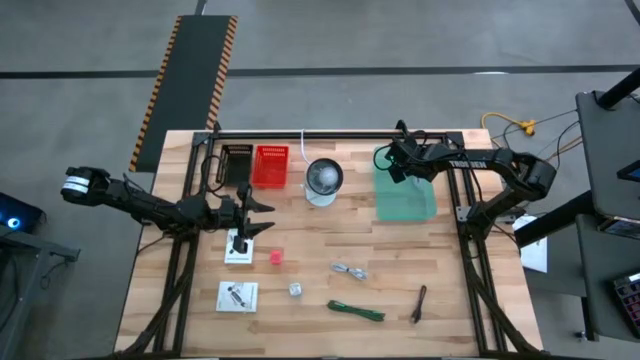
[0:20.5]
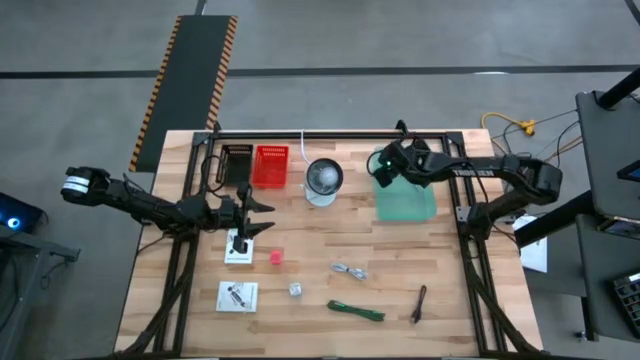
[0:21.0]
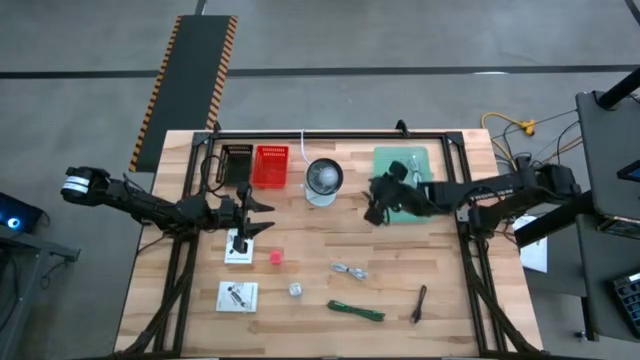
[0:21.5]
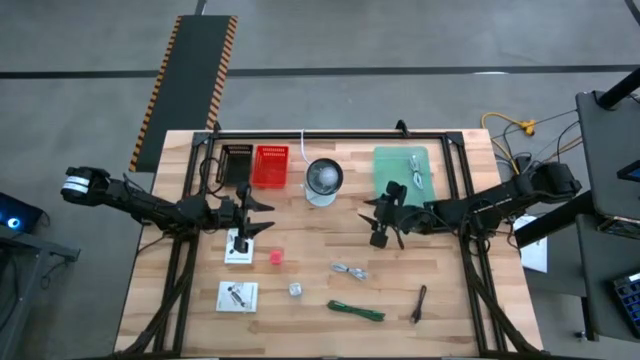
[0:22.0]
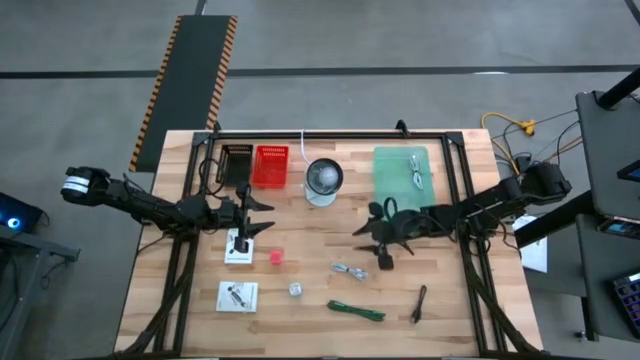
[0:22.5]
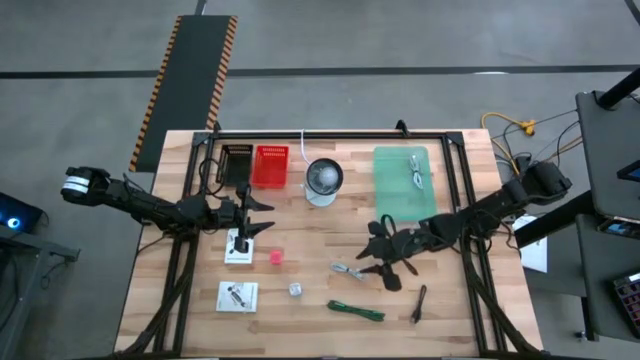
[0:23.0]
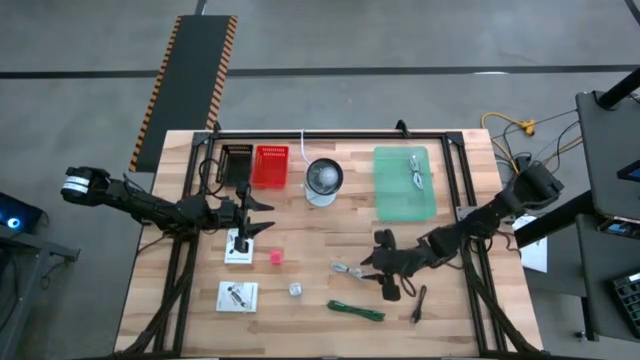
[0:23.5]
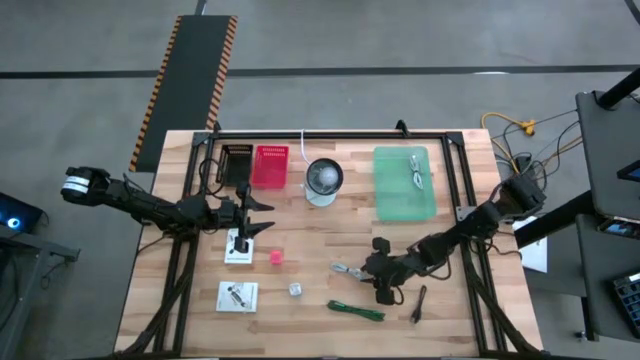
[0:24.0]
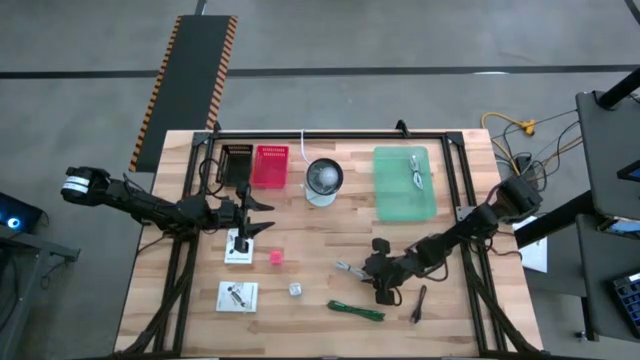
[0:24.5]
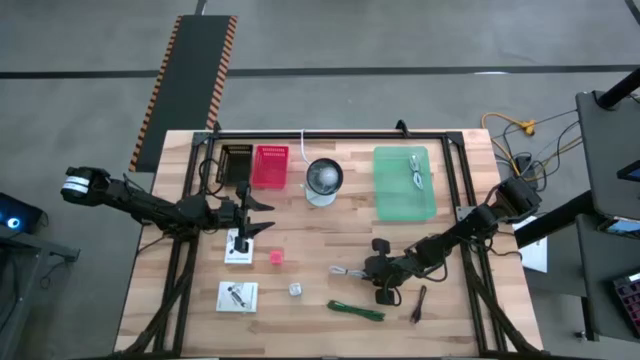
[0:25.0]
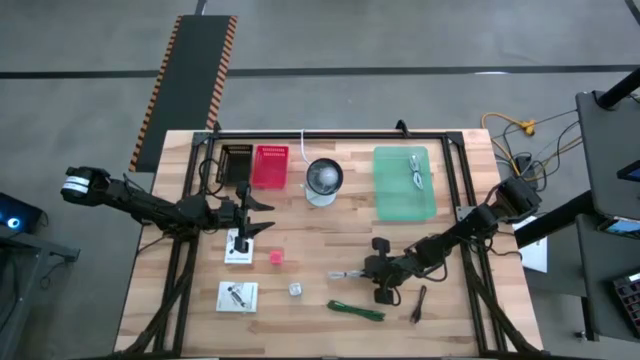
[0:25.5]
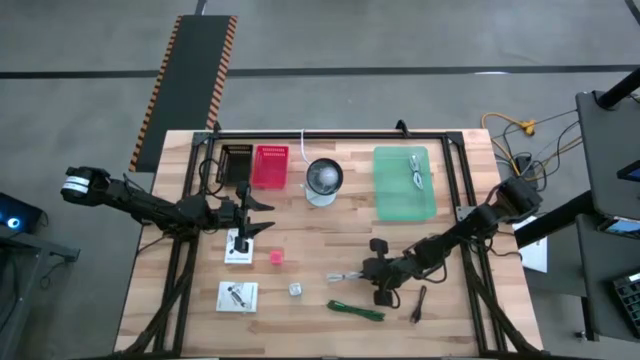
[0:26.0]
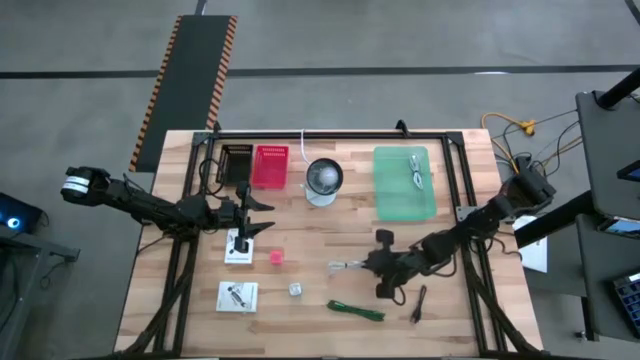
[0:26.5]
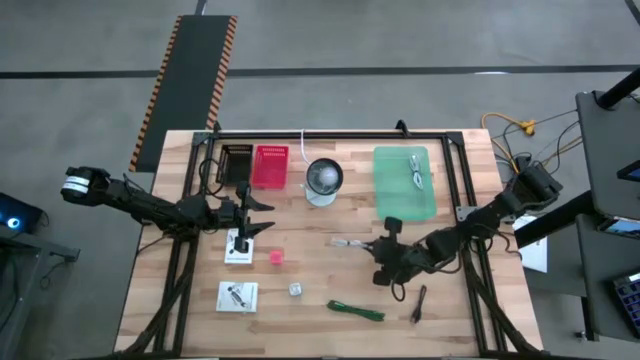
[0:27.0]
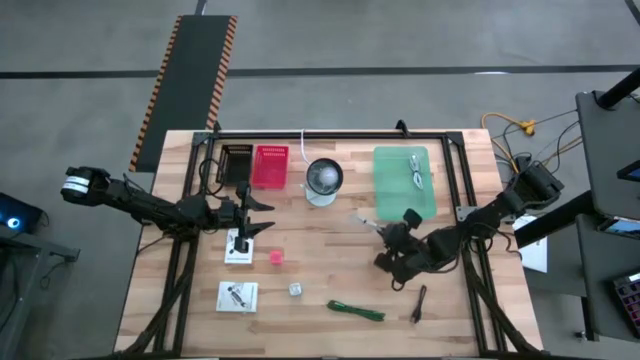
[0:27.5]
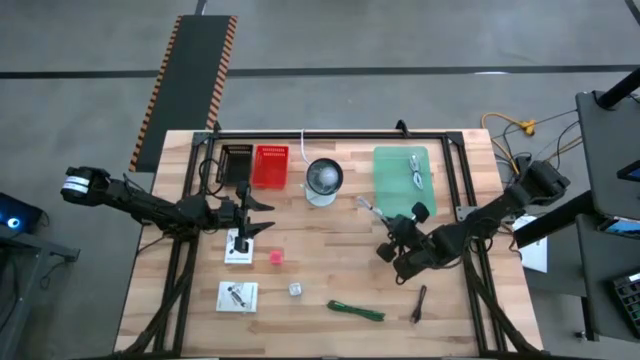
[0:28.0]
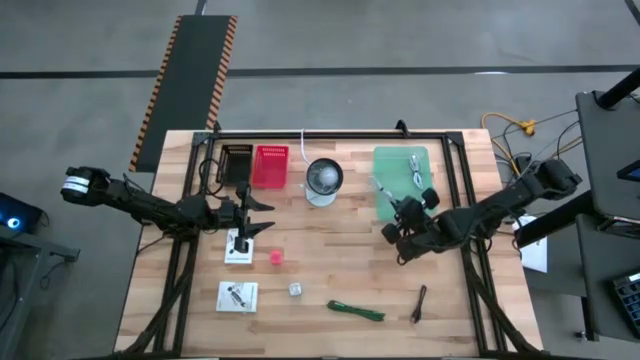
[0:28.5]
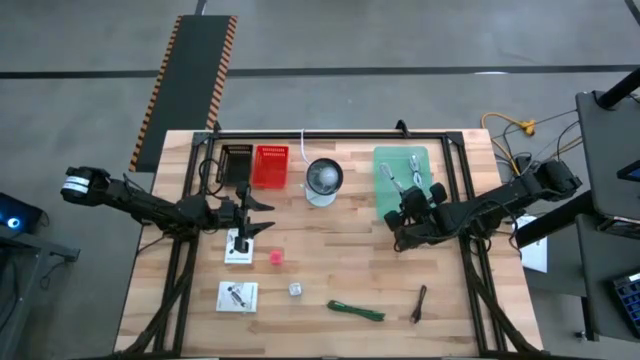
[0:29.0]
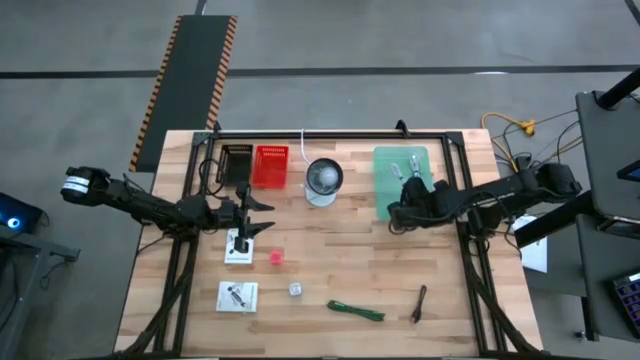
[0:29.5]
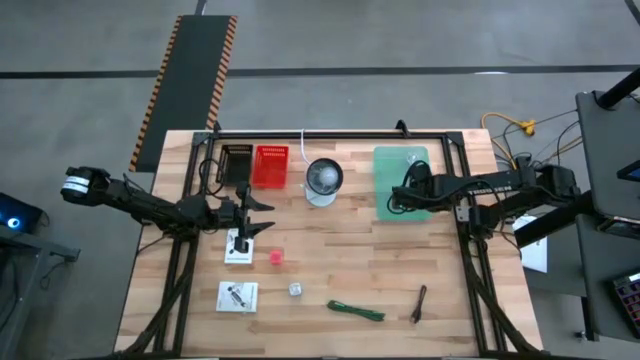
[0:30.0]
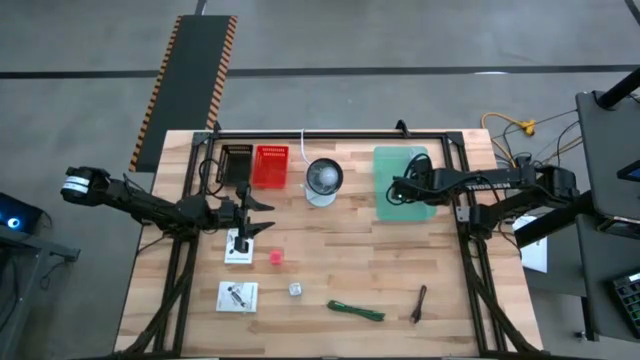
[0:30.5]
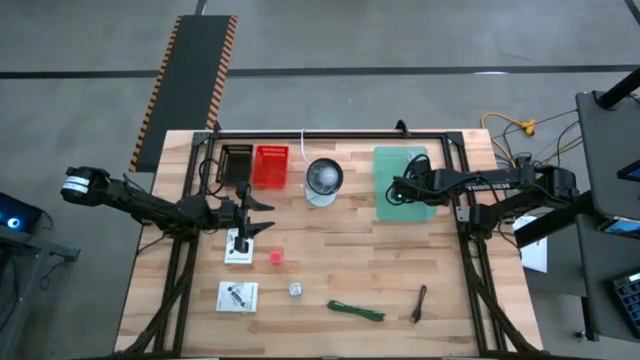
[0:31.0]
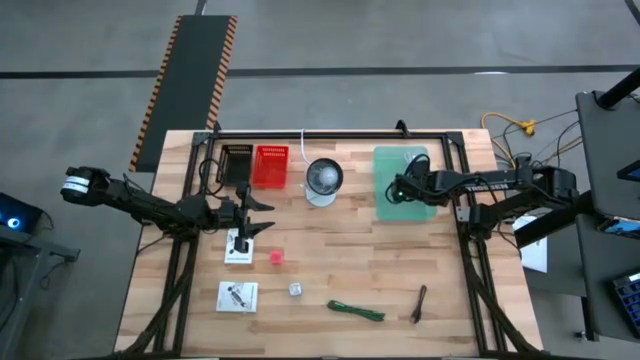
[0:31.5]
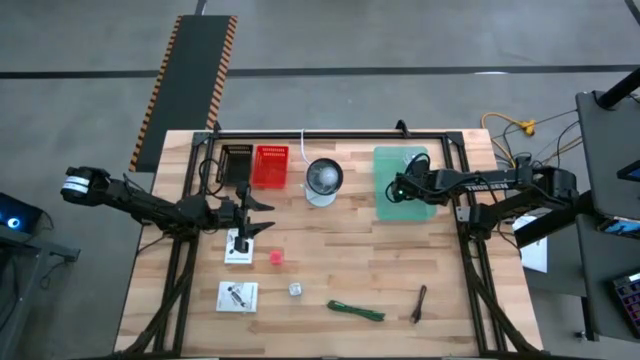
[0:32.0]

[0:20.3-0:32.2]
Task: Pick and place items into bin
Put the white charger cable into the green bin

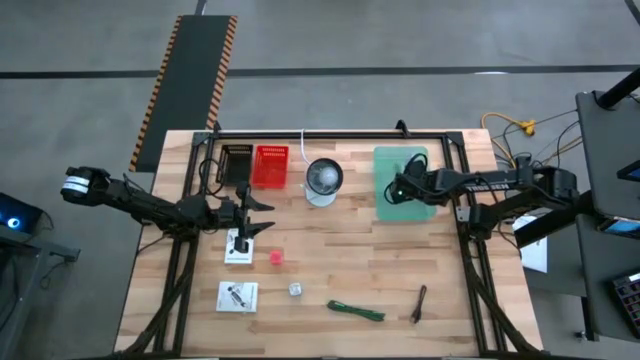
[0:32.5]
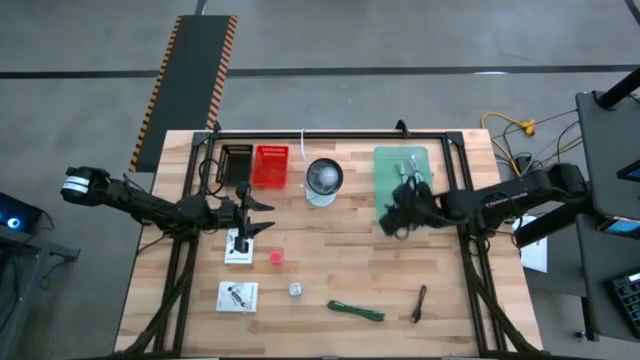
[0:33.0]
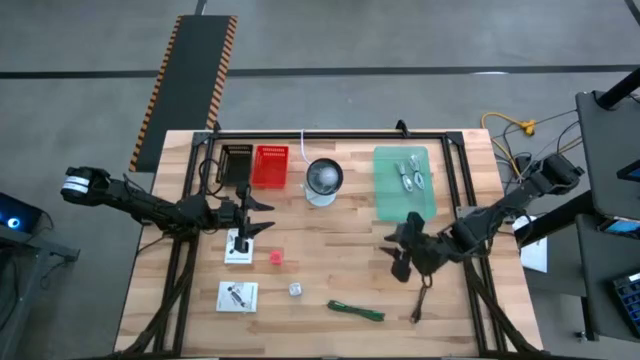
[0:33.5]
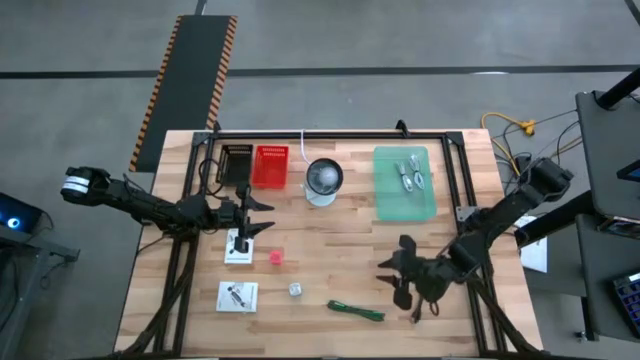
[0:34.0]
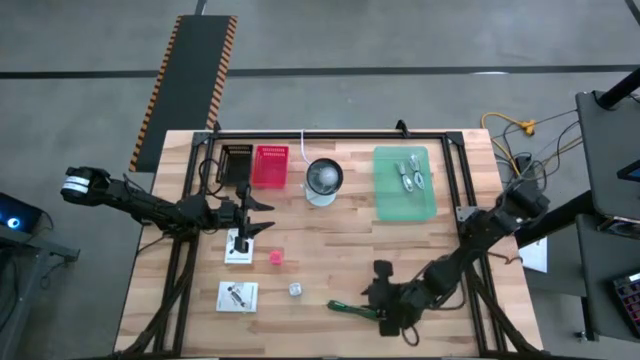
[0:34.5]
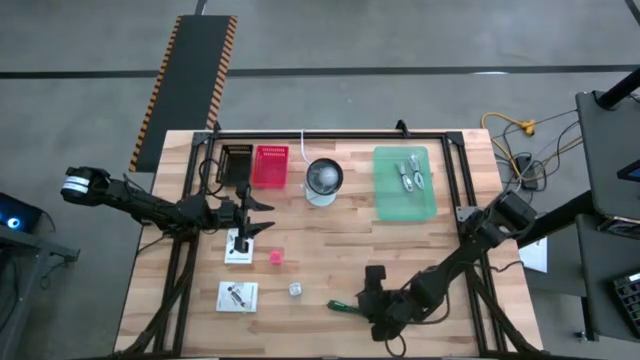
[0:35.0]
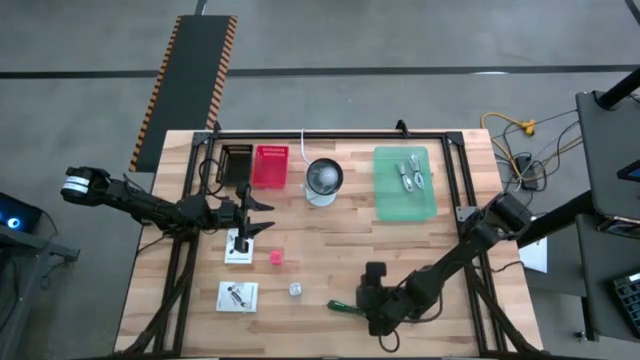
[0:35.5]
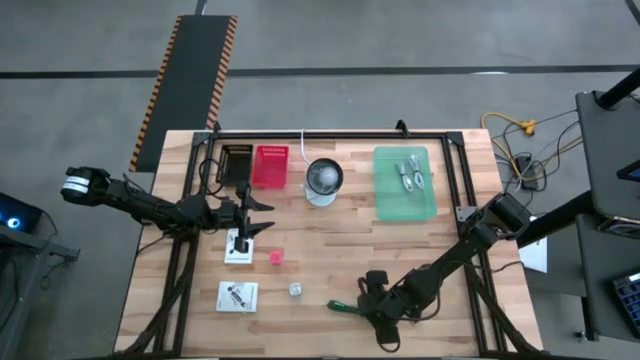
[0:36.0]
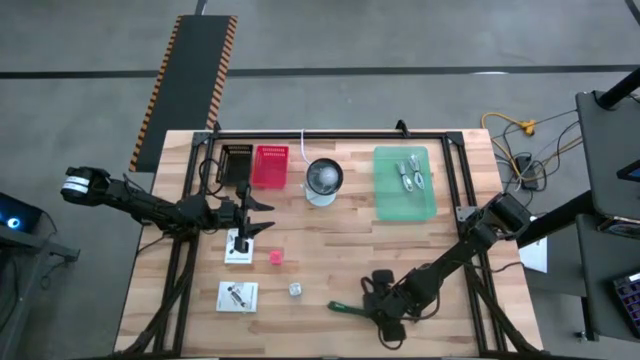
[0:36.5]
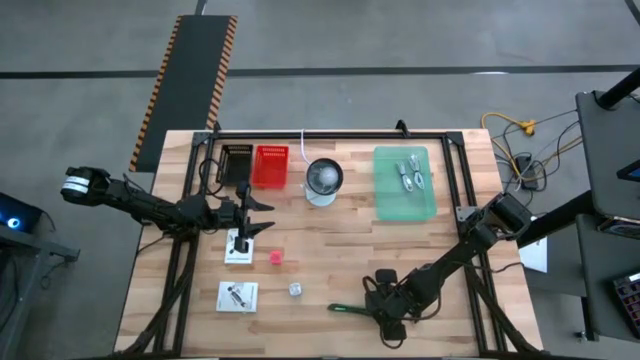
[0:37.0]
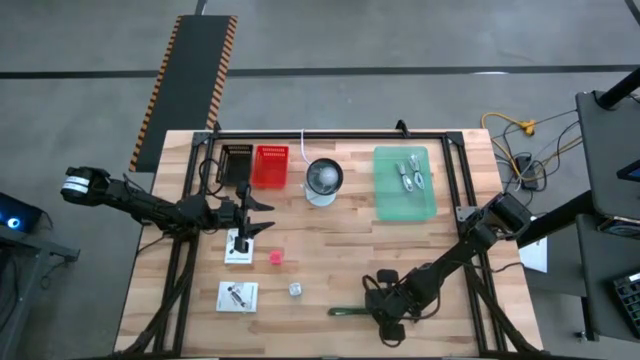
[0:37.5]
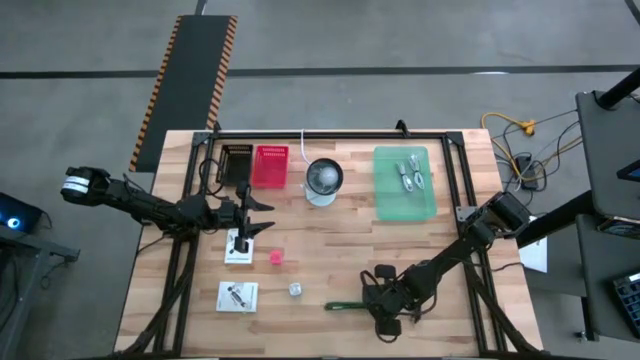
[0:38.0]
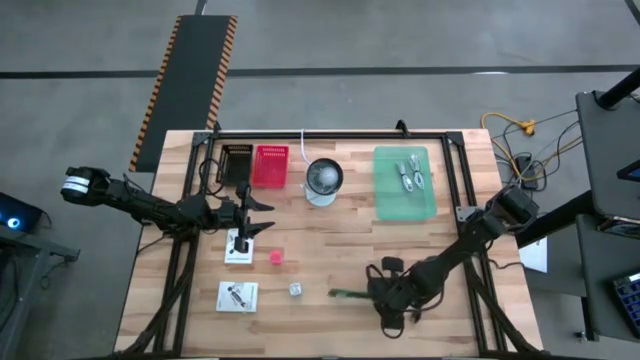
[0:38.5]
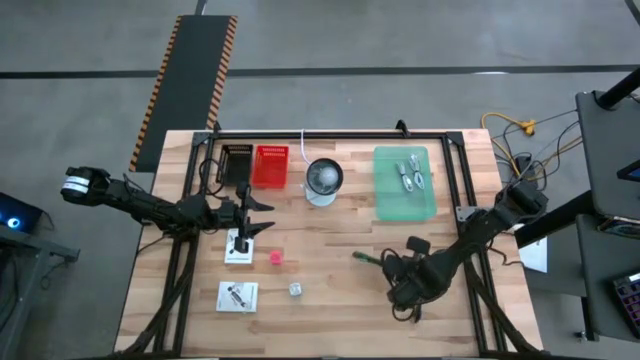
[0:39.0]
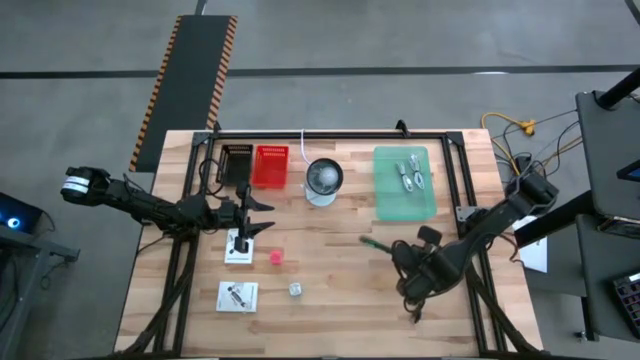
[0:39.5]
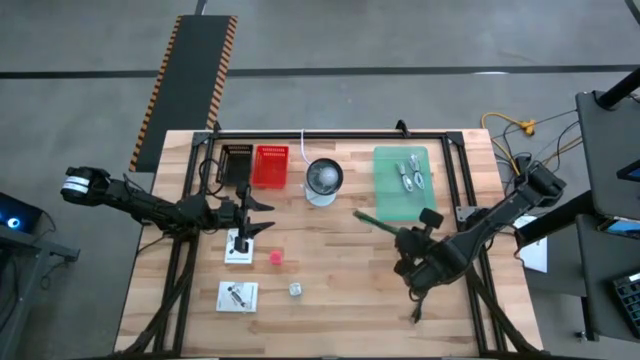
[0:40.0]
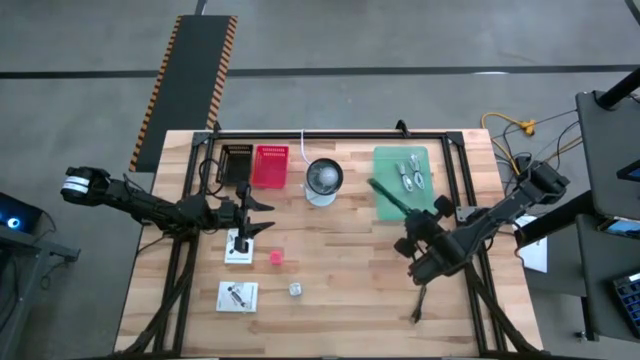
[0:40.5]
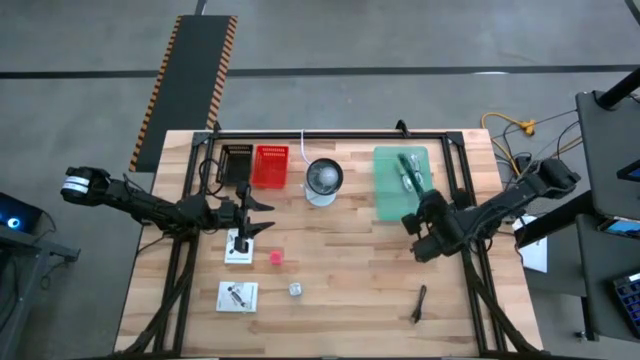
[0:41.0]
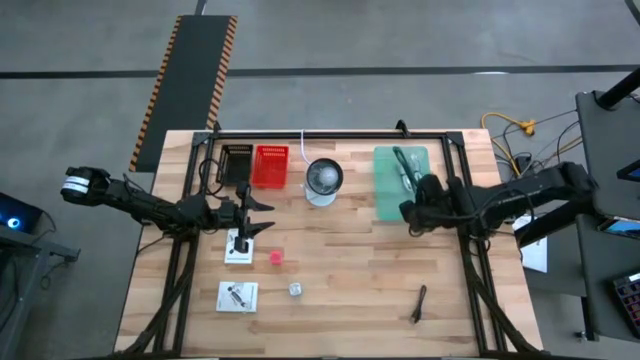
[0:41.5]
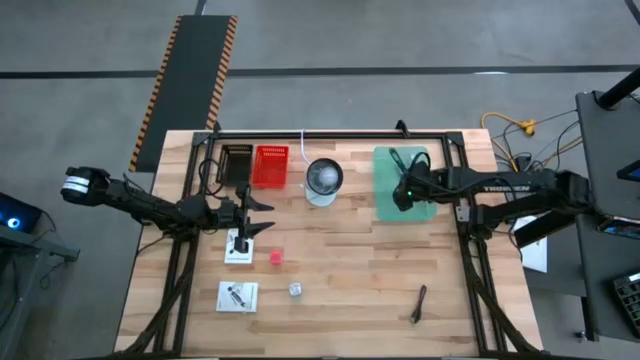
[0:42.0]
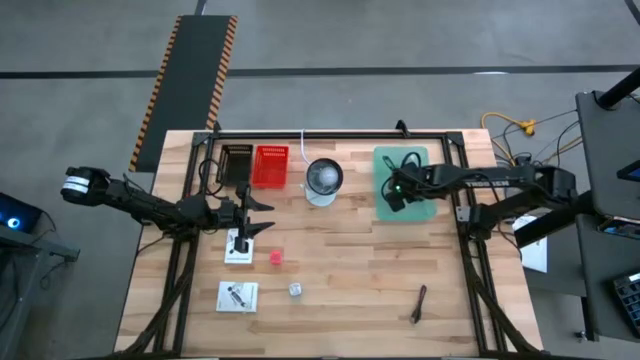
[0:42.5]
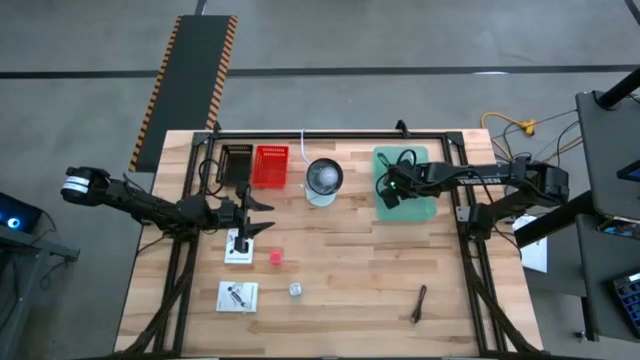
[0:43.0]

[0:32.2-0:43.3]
Put the green charger cable into the green bin
